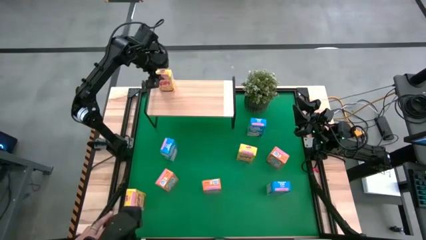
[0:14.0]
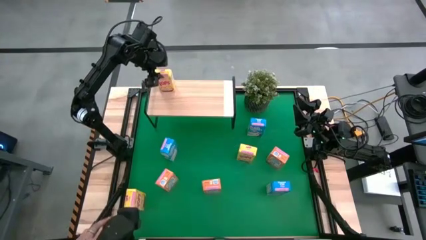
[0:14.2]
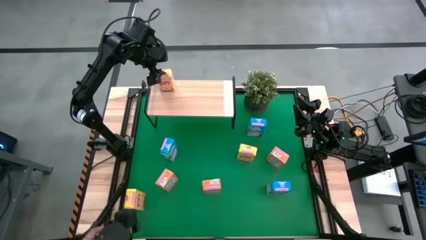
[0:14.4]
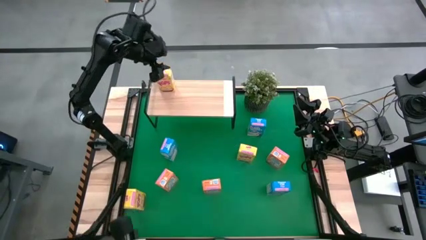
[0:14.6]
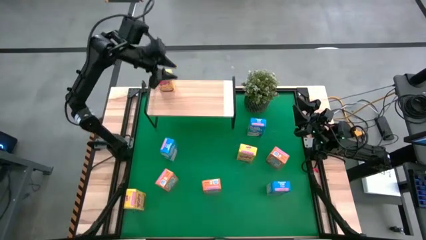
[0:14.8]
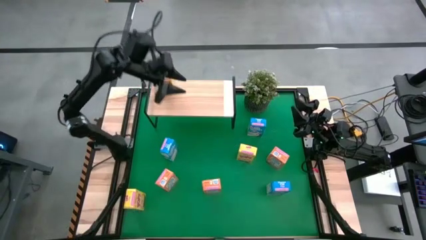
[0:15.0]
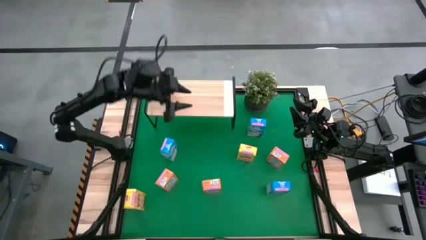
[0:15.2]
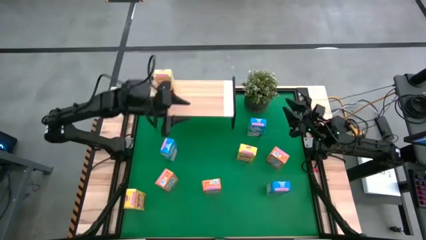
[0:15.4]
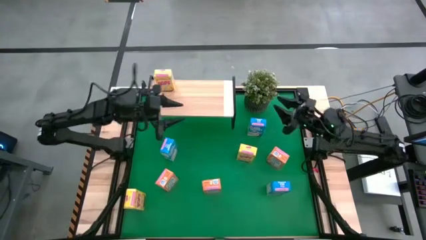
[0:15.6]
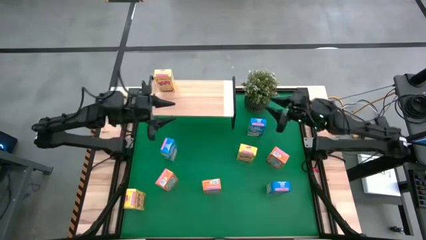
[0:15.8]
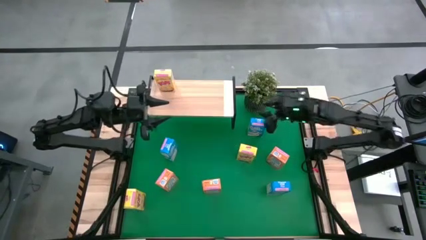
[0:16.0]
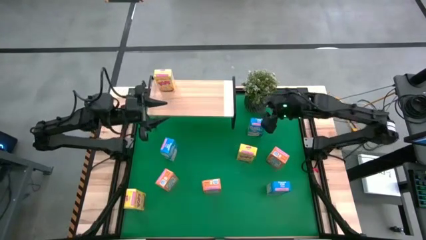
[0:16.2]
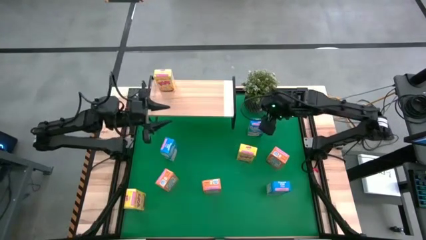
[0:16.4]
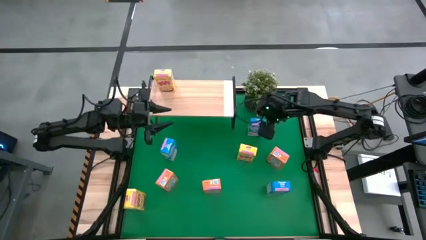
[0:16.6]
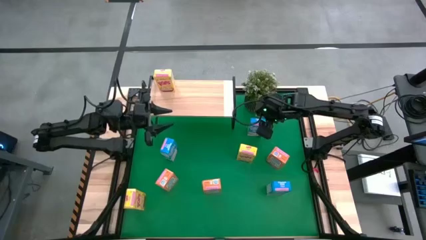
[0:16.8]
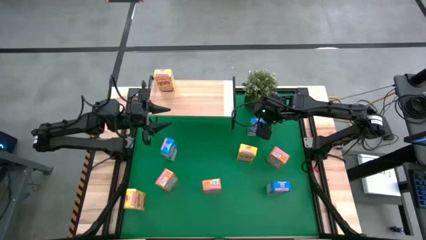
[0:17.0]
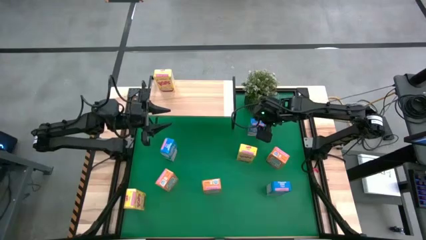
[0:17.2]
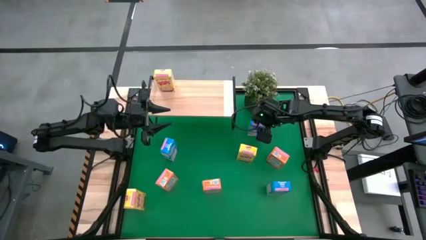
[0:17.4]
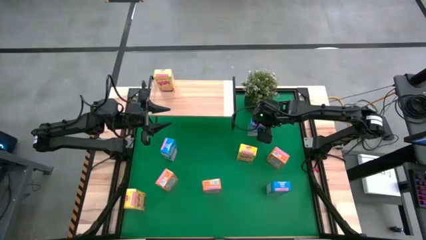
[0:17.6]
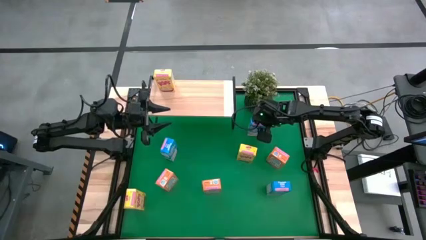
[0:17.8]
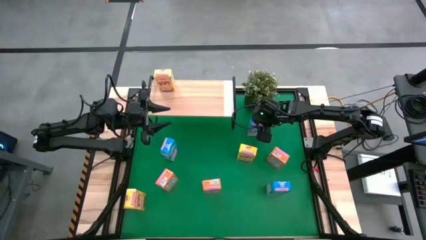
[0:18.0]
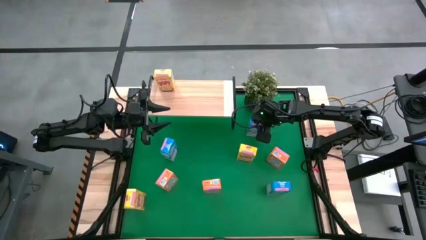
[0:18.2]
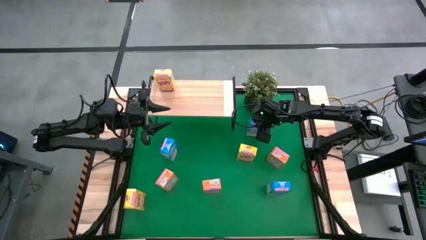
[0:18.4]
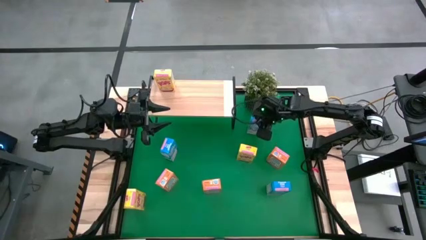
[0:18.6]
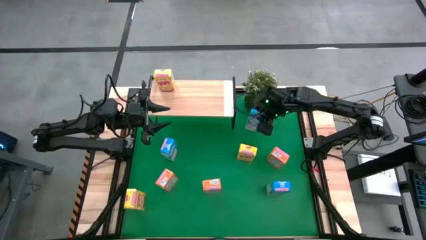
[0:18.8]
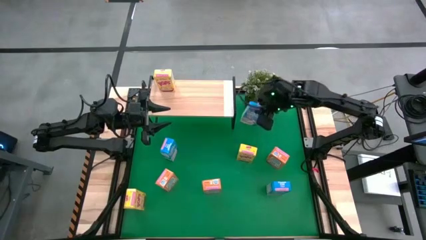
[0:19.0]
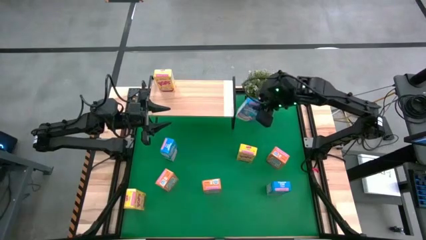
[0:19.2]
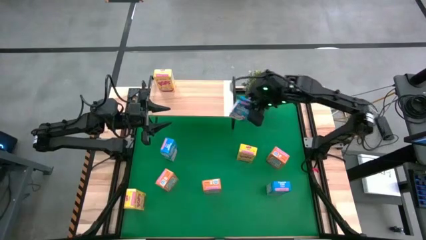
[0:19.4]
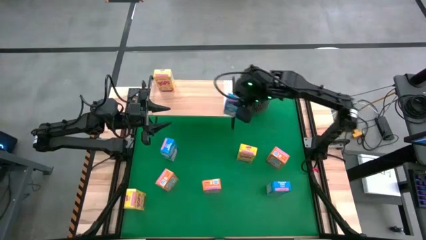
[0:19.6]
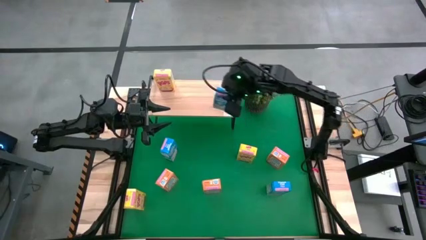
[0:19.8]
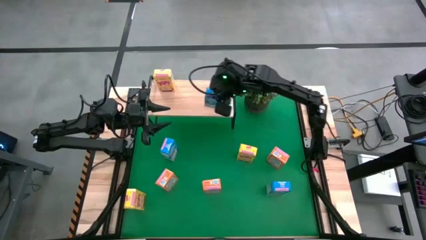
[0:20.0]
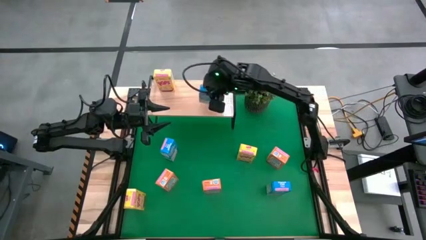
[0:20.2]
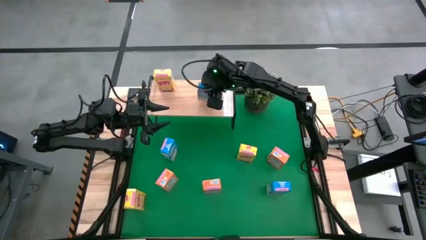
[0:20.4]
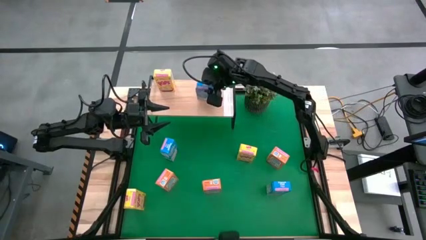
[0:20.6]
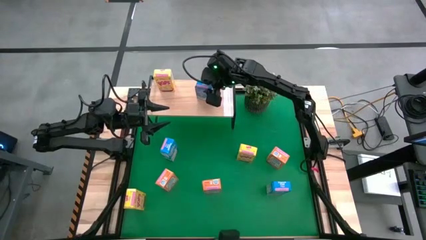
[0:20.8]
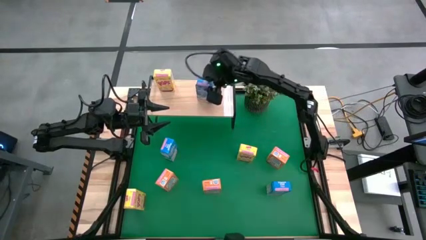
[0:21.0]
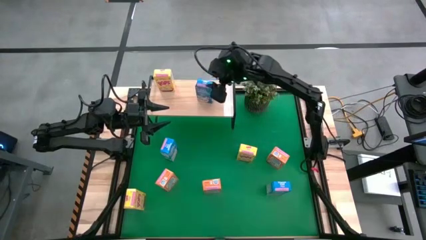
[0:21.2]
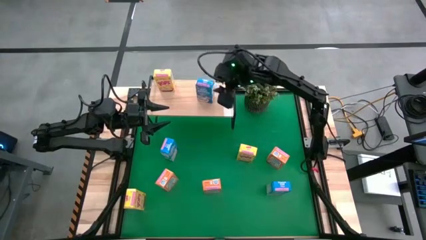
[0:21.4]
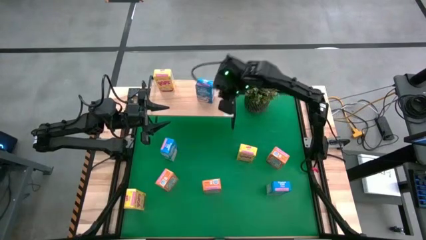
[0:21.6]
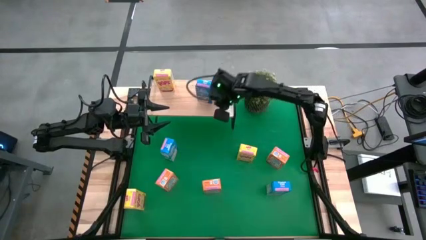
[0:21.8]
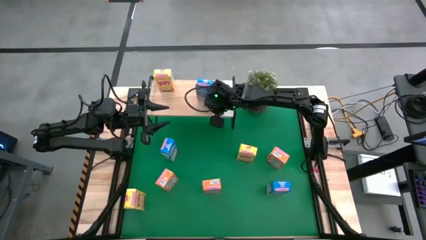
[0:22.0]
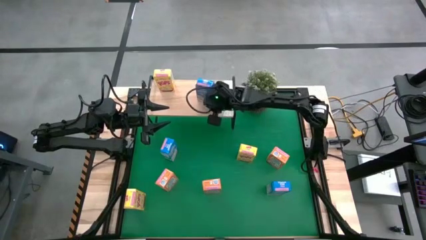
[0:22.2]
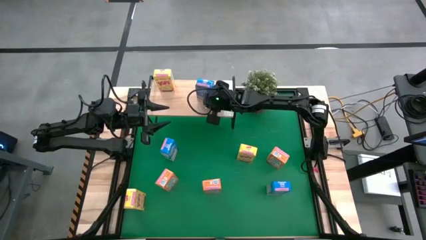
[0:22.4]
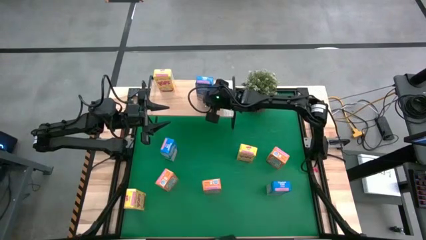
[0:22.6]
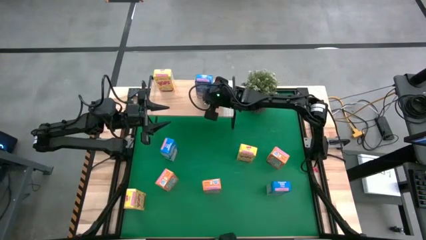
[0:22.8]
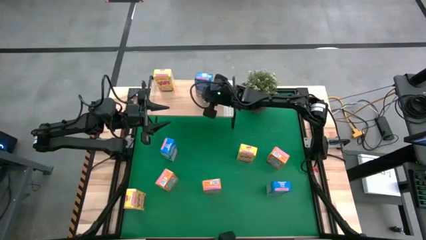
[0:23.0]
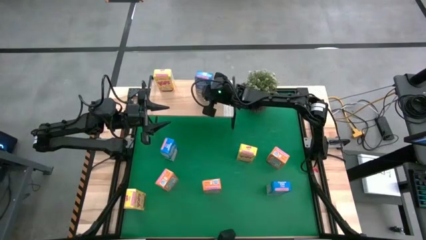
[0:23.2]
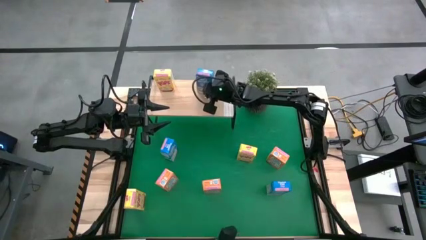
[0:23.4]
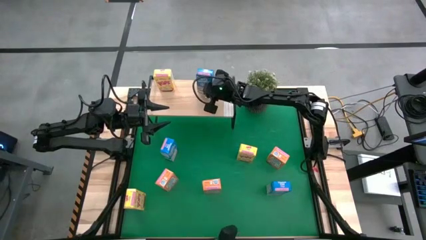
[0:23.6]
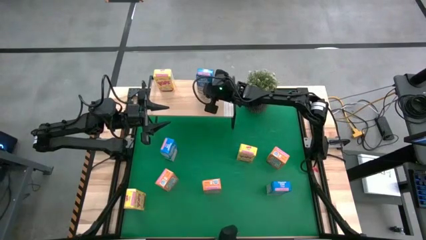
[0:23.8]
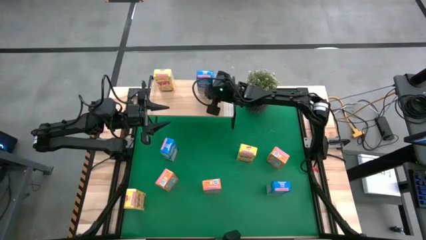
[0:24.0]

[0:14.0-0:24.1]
Task: Stack cereal on shelf
Put the top right blue cereal box on the shelf
